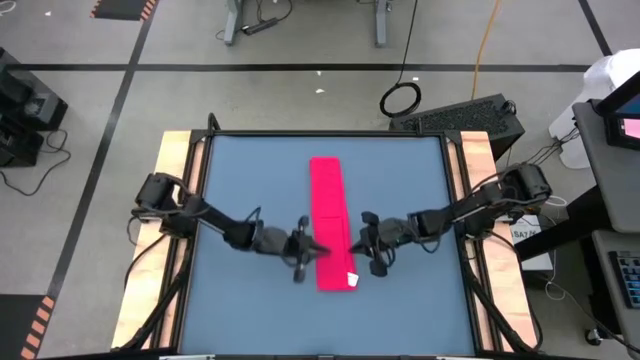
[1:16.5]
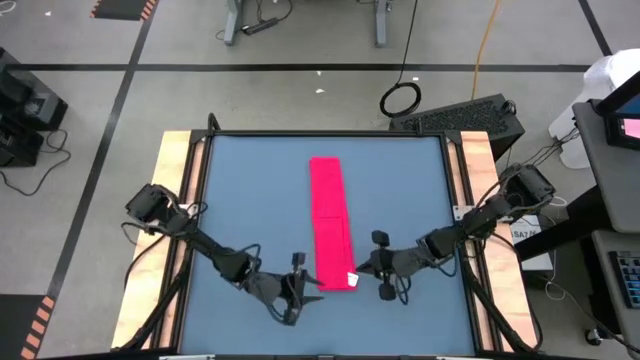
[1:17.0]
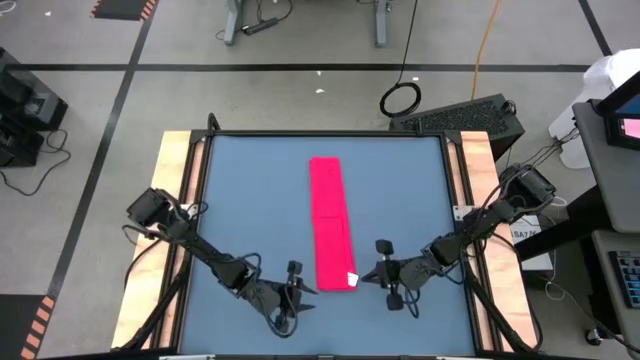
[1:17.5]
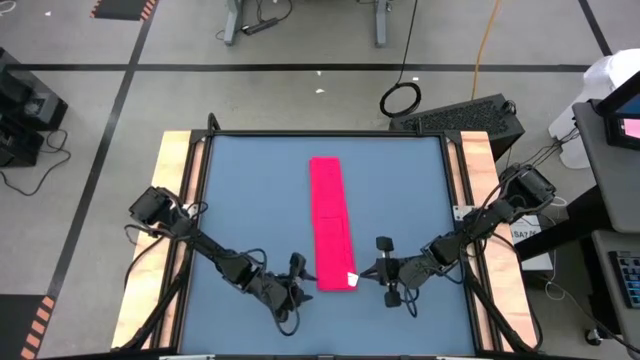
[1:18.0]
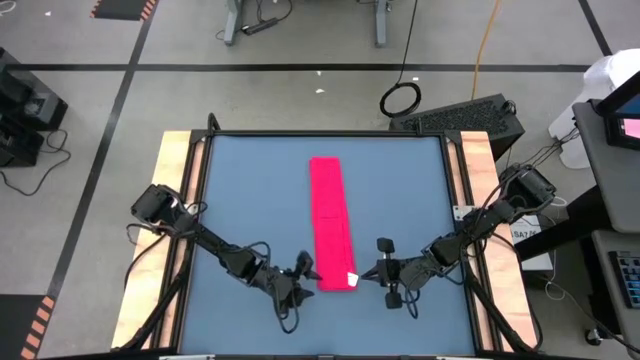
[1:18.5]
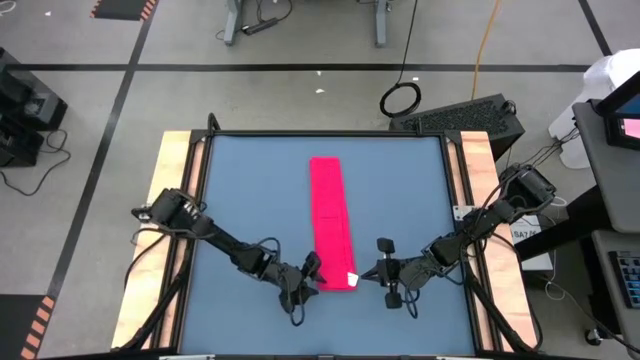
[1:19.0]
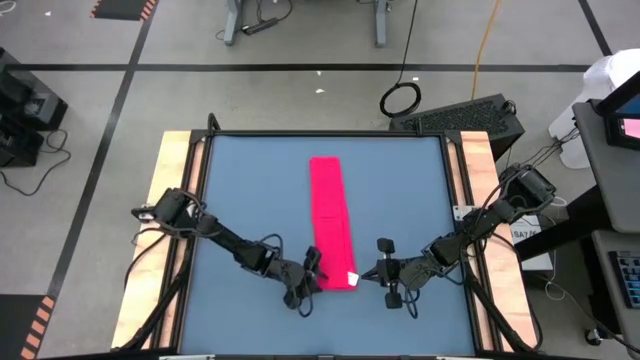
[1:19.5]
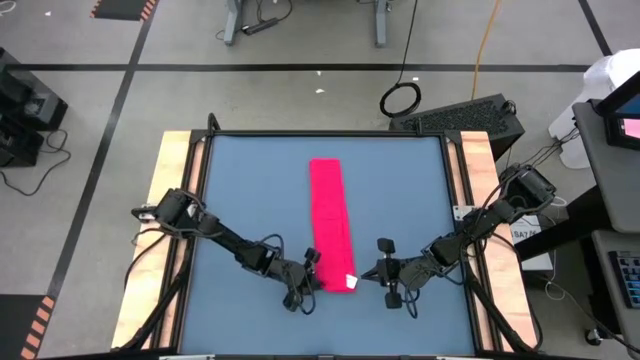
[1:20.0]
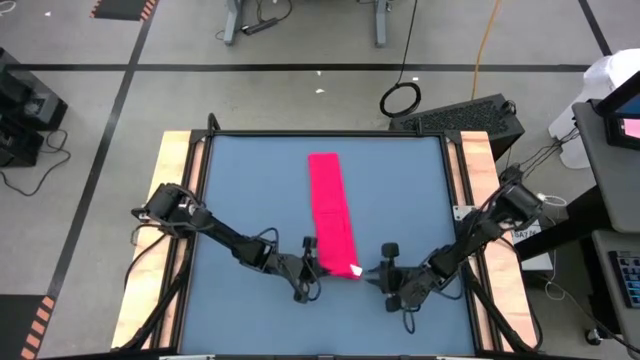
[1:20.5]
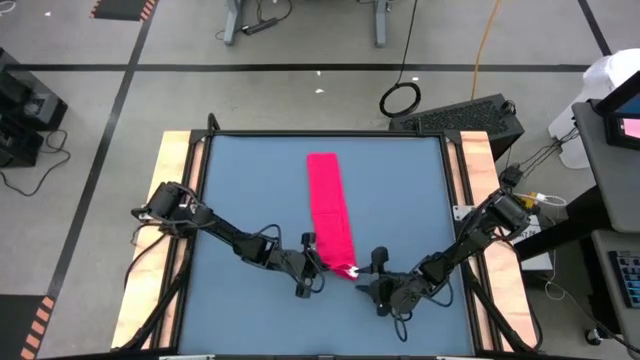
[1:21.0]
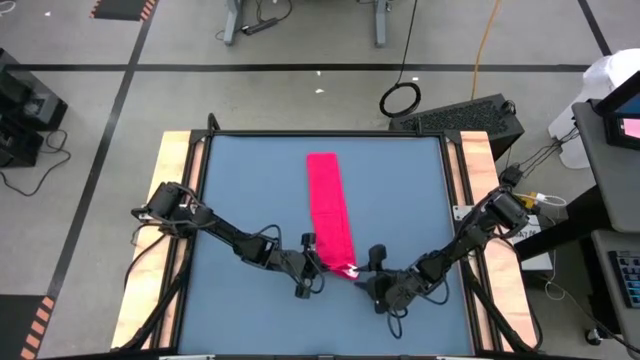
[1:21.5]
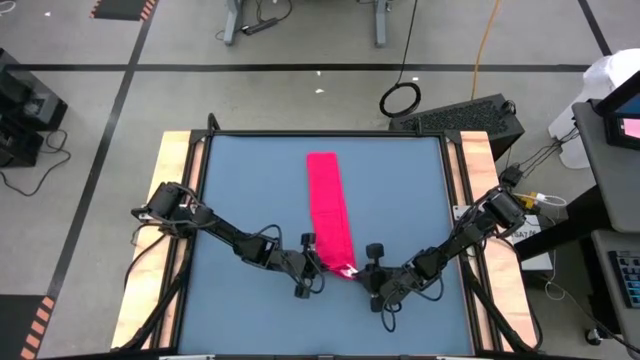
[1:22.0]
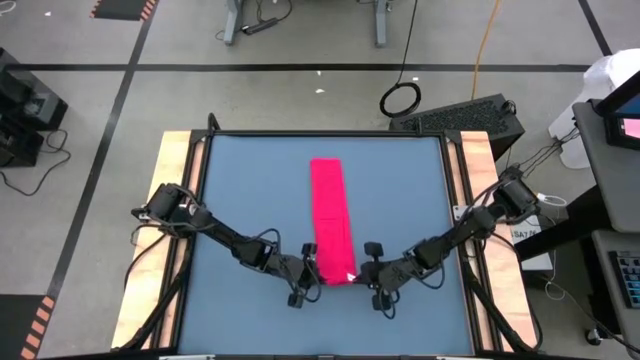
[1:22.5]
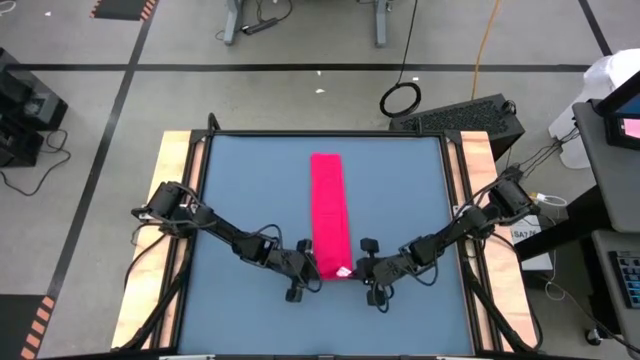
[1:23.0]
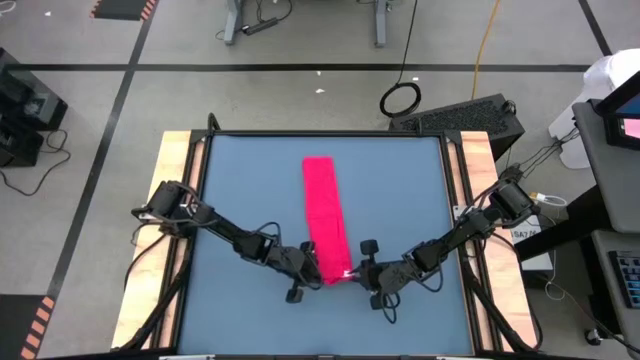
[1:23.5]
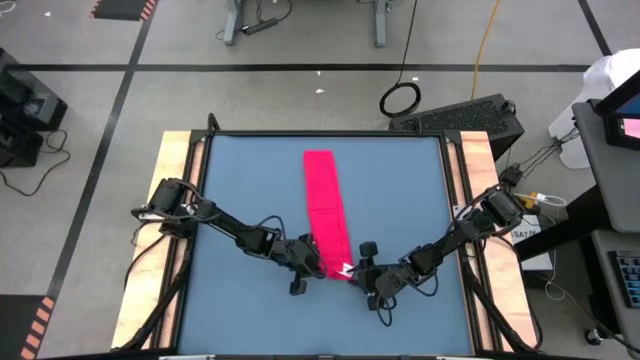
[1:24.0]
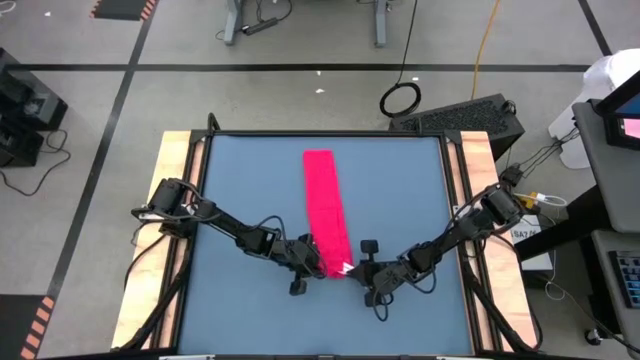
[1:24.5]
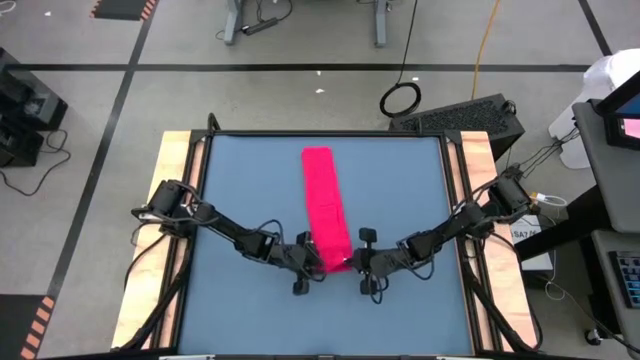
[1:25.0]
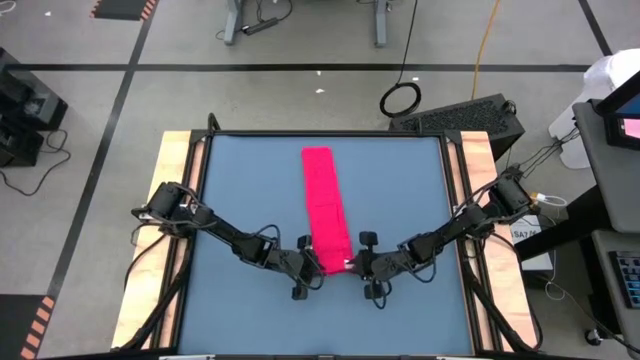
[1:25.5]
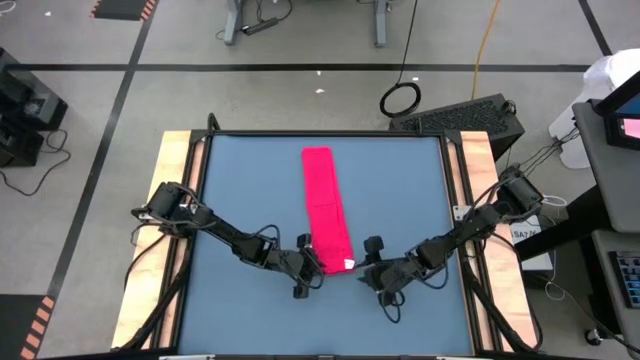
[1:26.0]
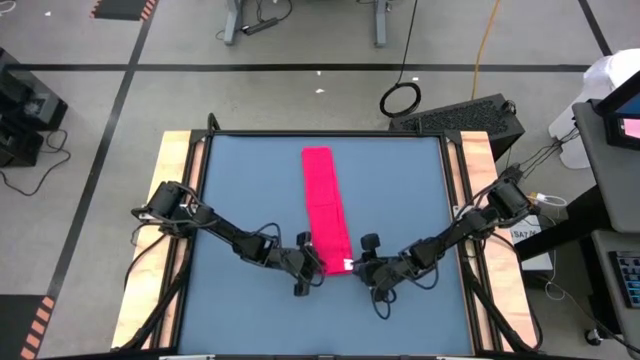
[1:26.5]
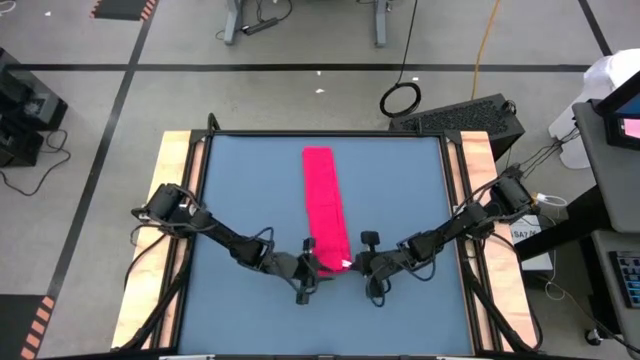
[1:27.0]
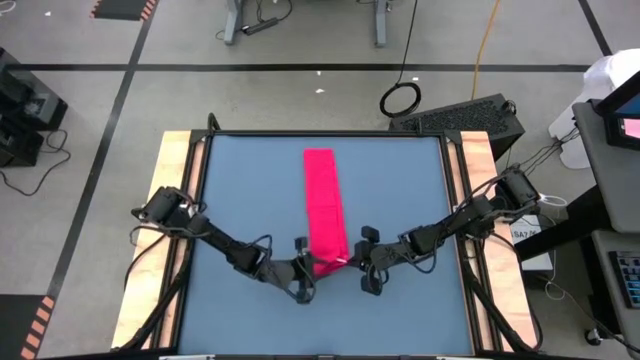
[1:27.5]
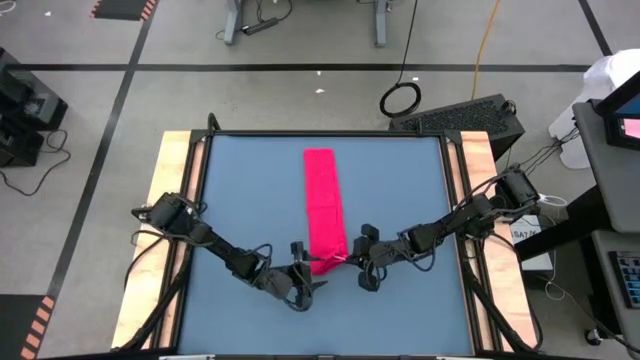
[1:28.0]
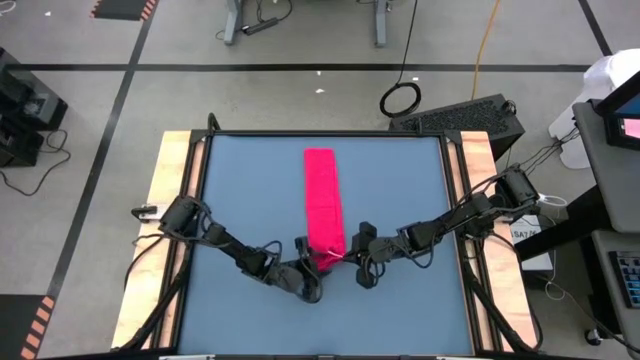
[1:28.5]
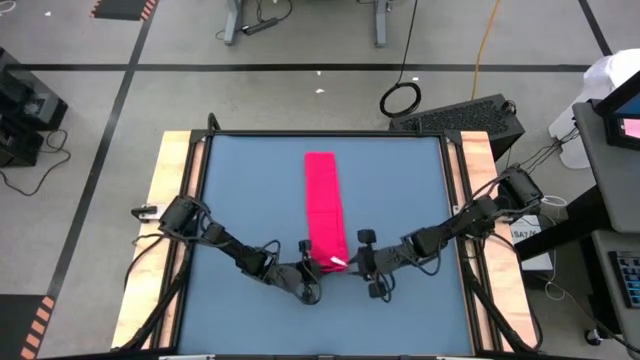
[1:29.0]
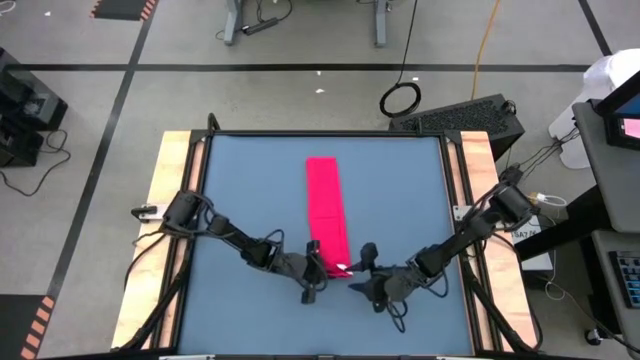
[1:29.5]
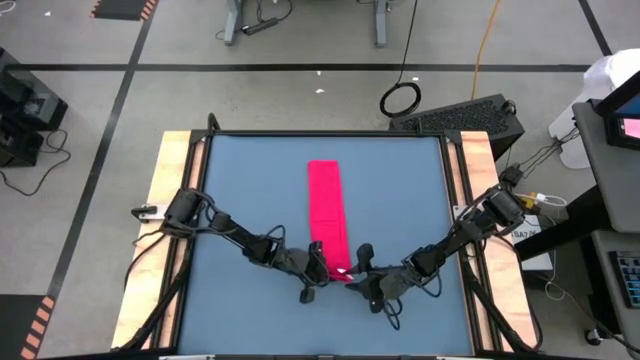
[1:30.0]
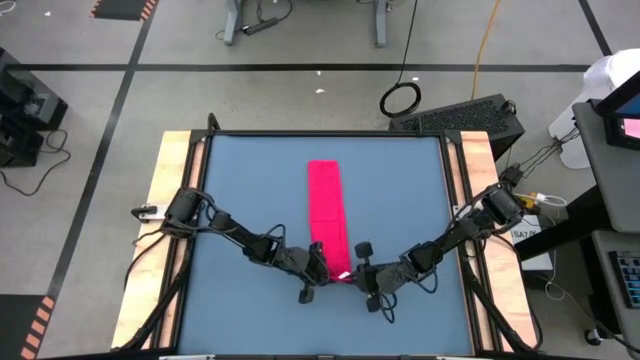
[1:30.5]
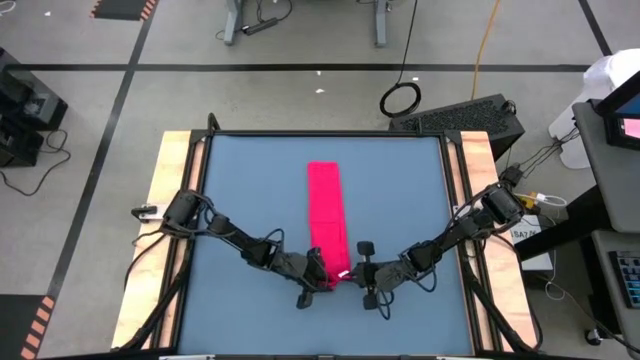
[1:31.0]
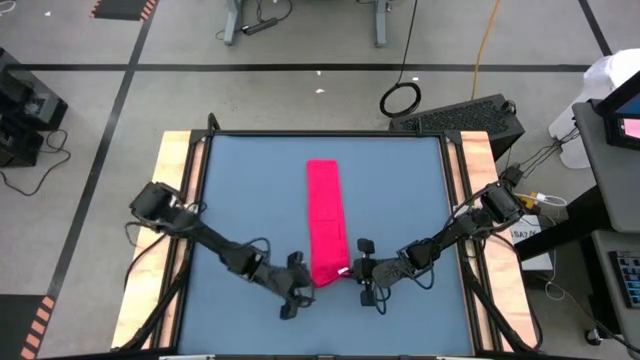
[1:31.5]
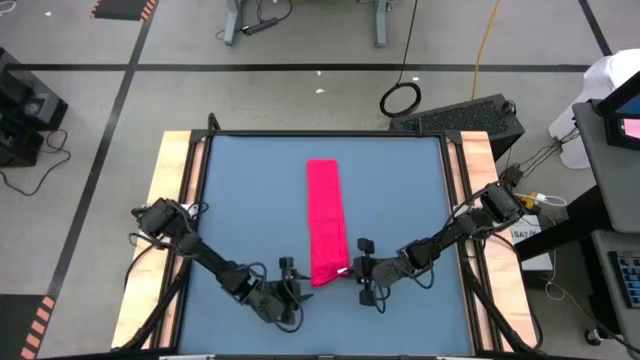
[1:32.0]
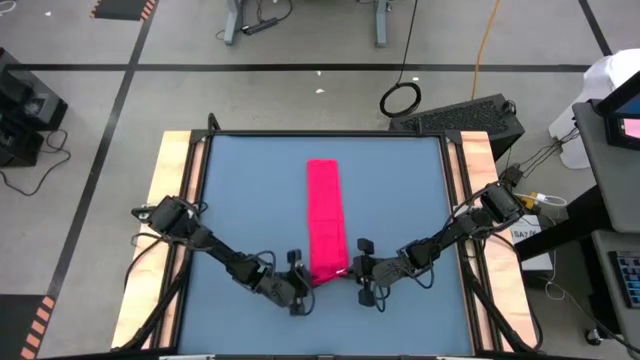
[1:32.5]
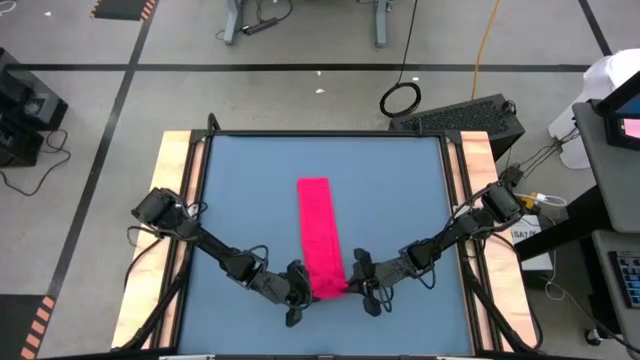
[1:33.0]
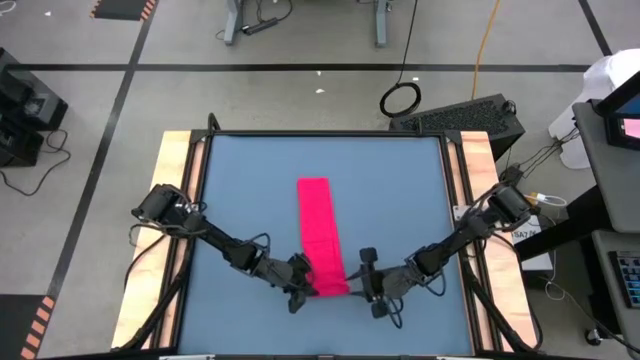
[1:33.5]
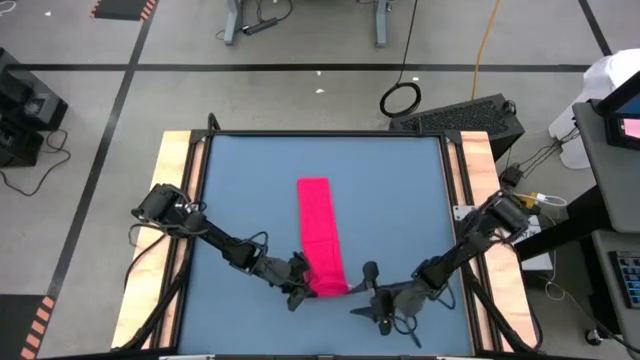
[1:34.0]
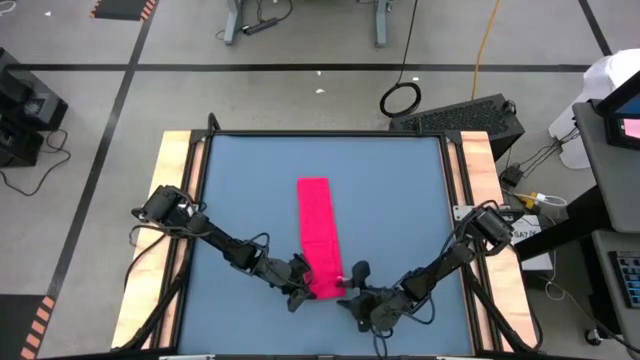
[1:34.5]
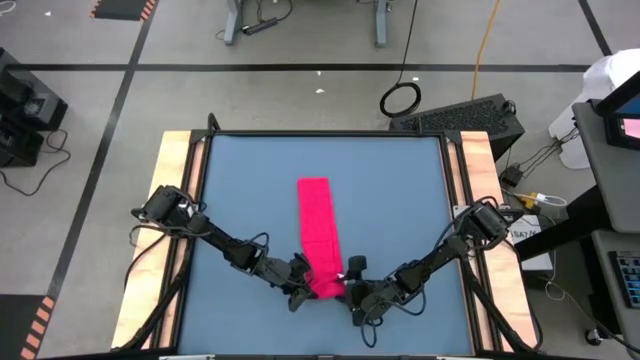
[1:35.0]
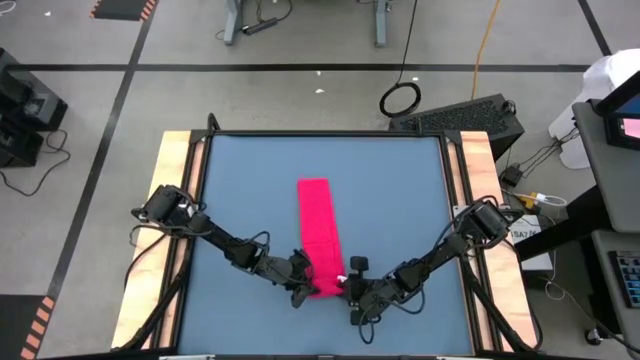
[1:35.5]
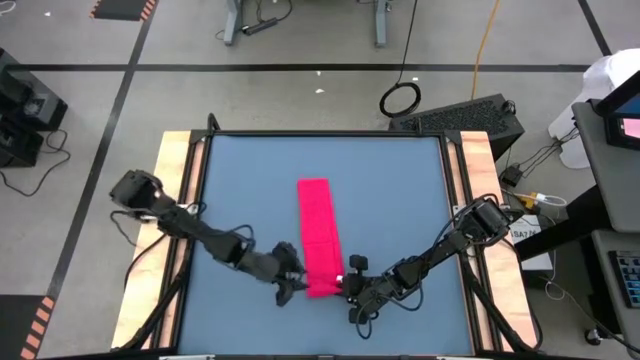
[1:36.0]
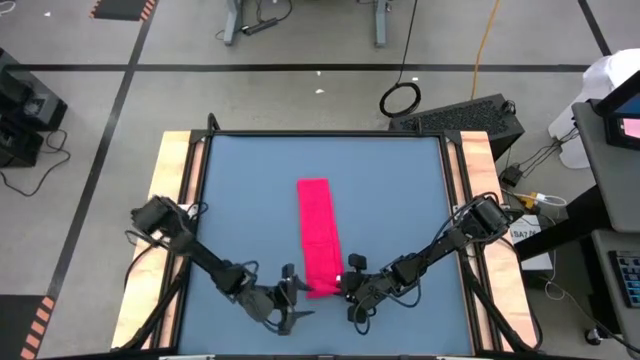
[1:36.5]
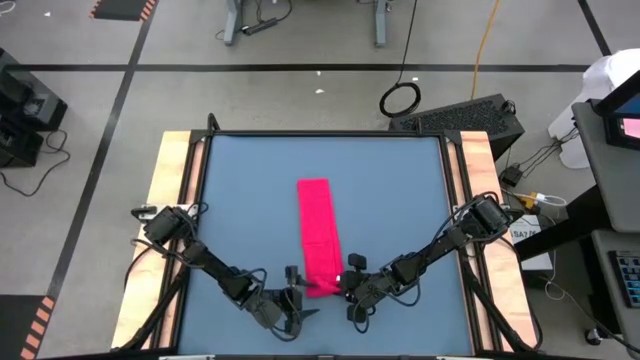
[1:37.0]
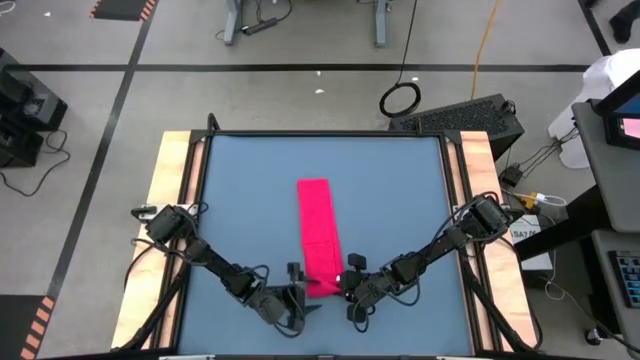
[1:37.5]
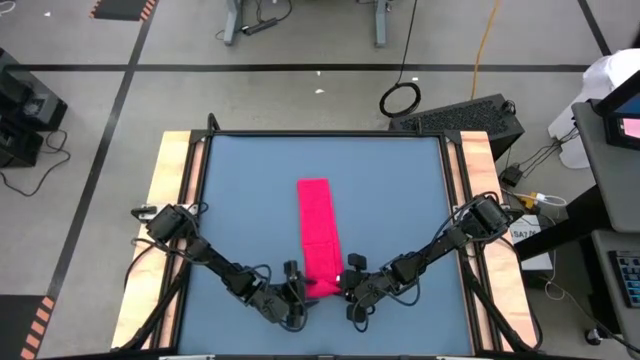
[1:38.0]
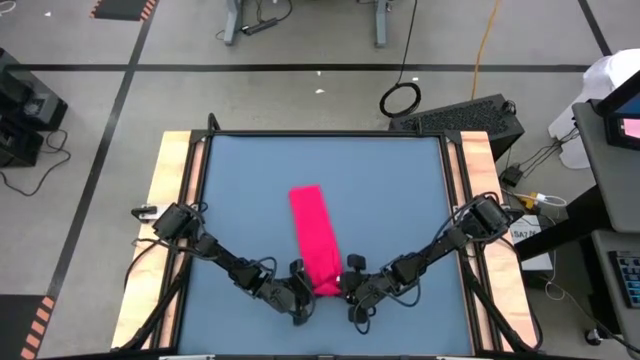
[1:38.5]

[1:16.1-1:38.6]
Task: Roll towel
Roll the red towel
